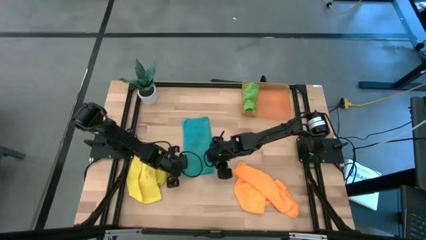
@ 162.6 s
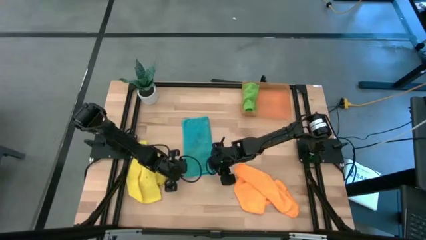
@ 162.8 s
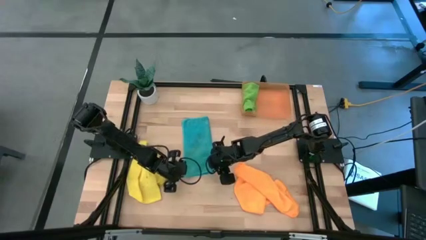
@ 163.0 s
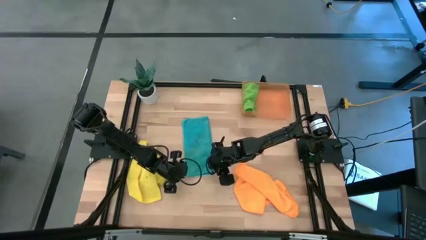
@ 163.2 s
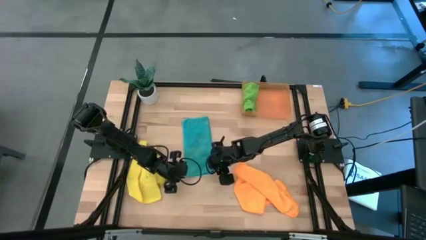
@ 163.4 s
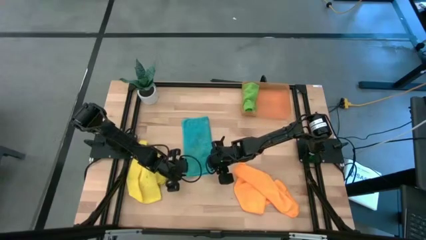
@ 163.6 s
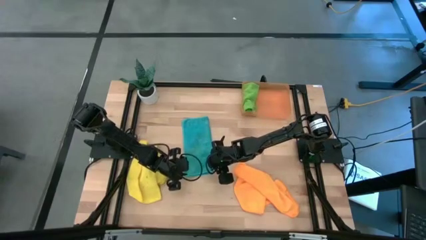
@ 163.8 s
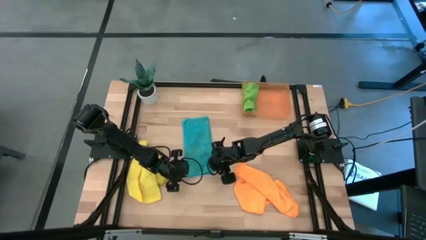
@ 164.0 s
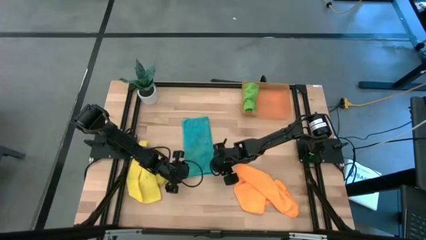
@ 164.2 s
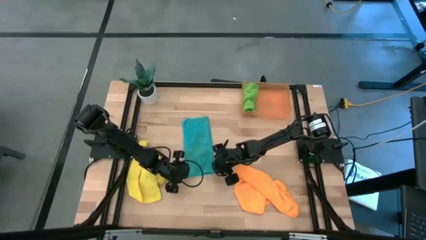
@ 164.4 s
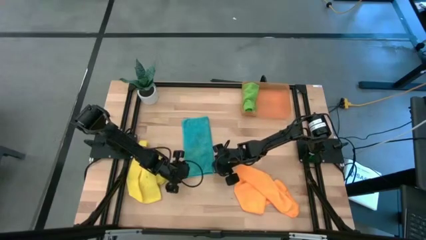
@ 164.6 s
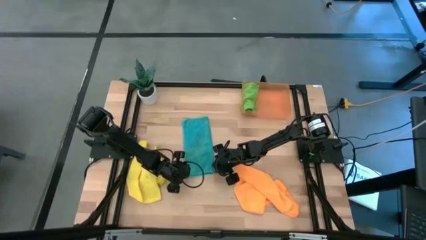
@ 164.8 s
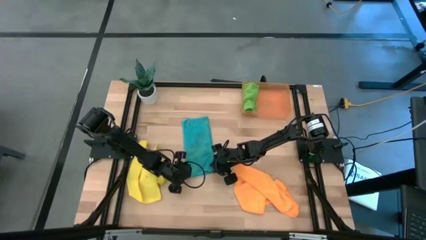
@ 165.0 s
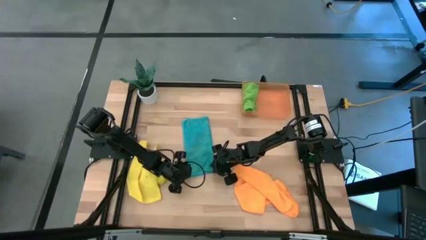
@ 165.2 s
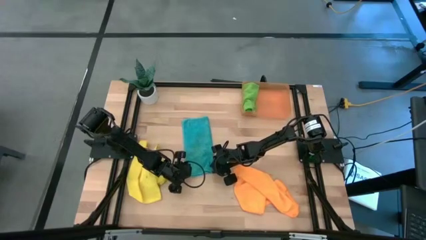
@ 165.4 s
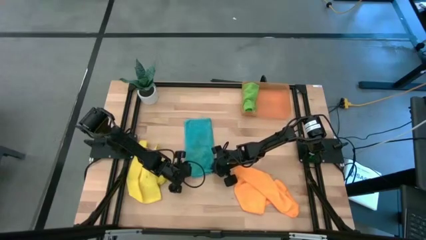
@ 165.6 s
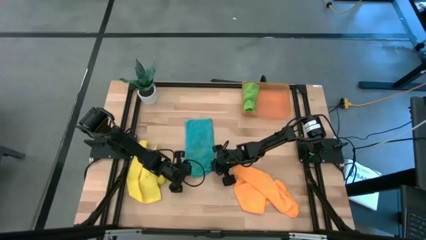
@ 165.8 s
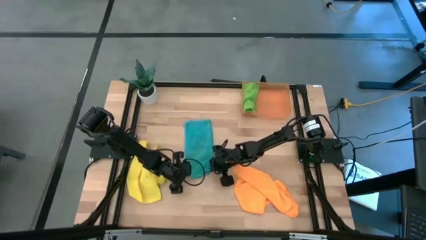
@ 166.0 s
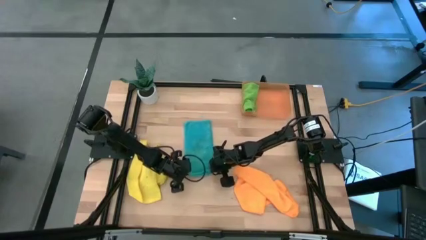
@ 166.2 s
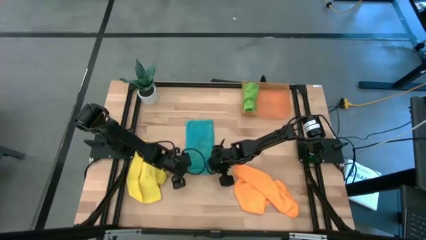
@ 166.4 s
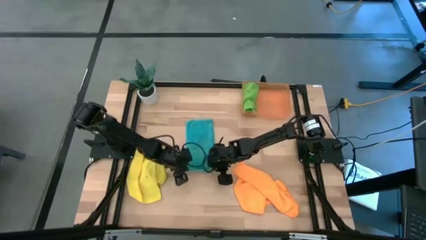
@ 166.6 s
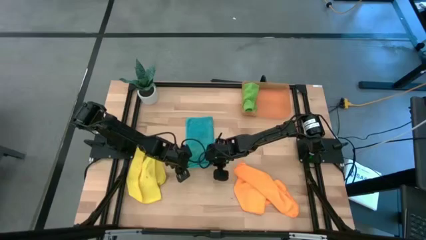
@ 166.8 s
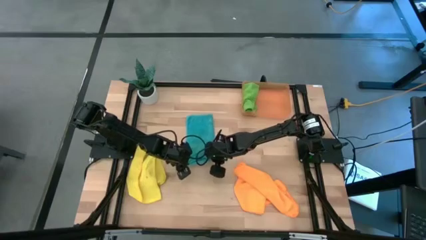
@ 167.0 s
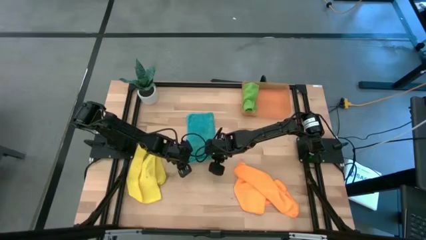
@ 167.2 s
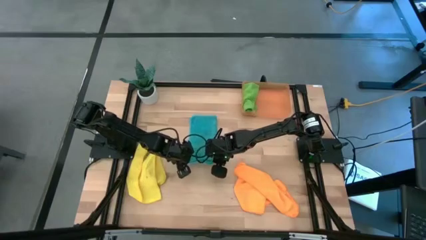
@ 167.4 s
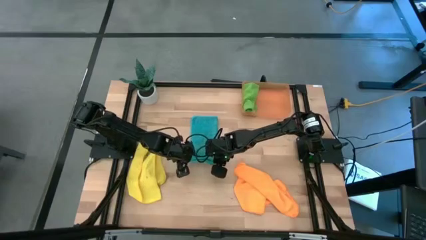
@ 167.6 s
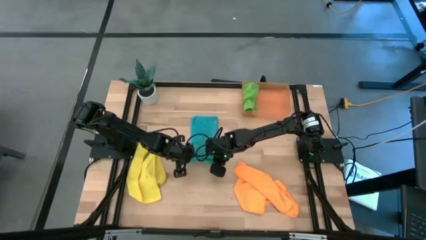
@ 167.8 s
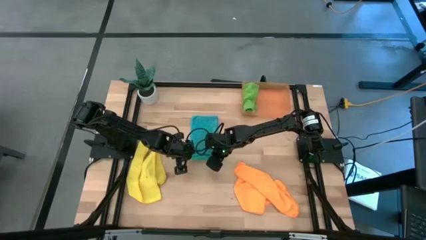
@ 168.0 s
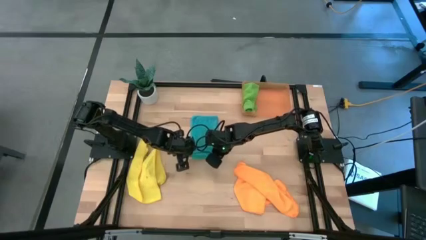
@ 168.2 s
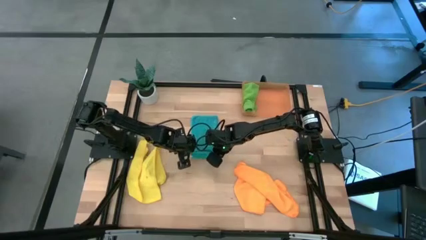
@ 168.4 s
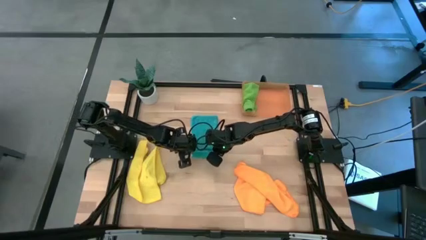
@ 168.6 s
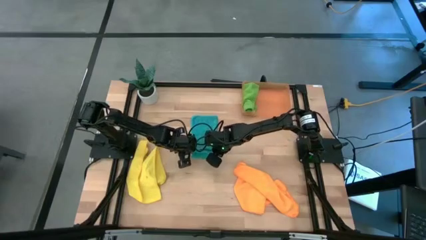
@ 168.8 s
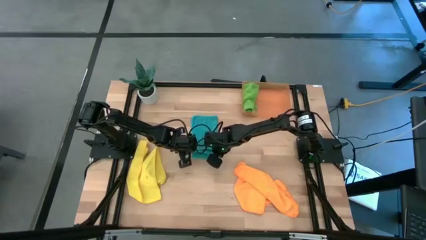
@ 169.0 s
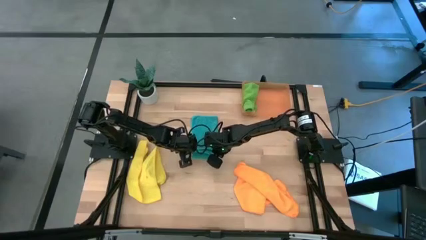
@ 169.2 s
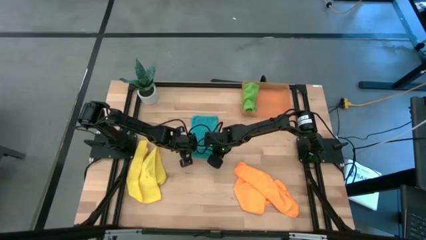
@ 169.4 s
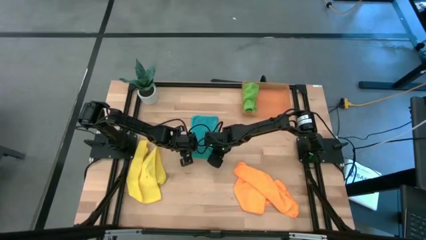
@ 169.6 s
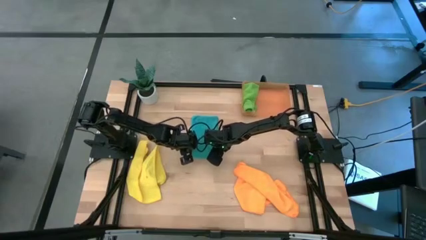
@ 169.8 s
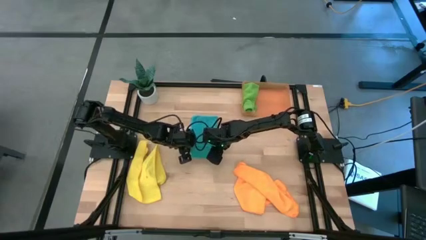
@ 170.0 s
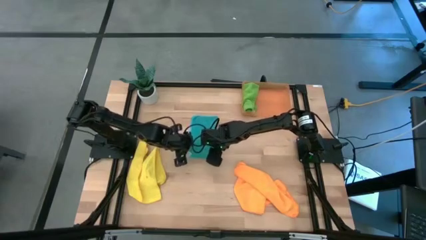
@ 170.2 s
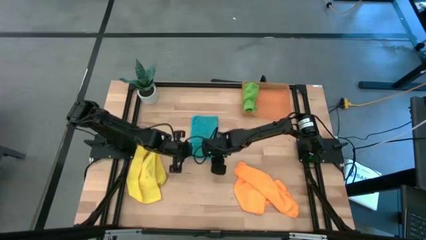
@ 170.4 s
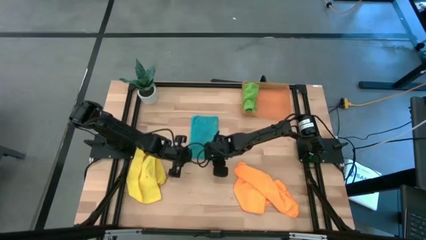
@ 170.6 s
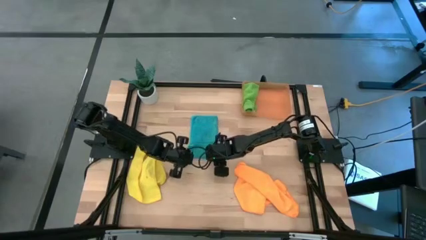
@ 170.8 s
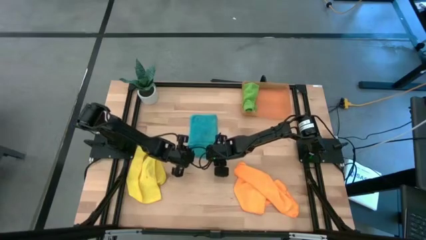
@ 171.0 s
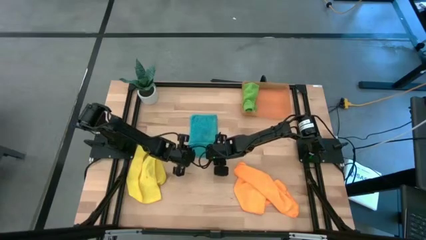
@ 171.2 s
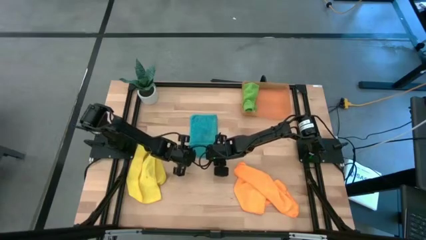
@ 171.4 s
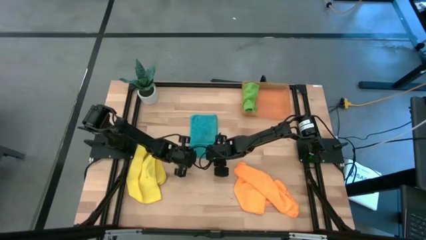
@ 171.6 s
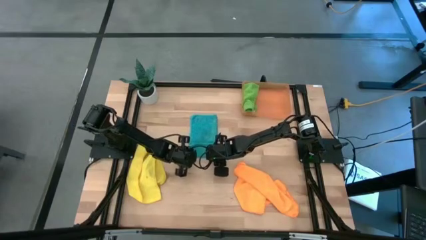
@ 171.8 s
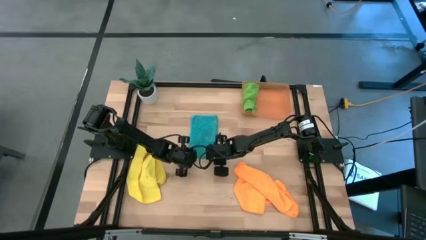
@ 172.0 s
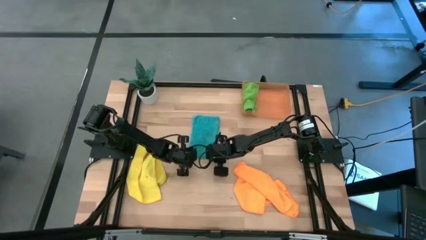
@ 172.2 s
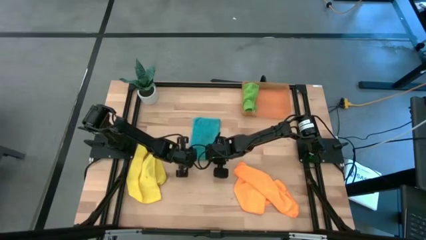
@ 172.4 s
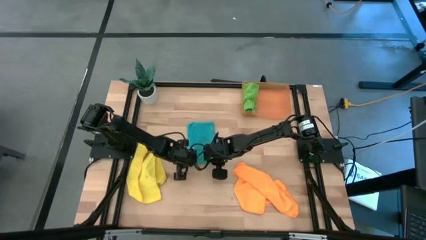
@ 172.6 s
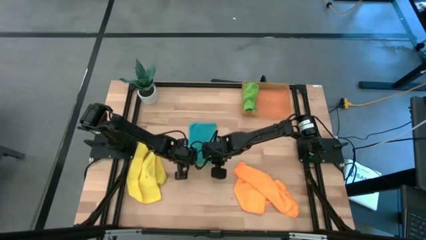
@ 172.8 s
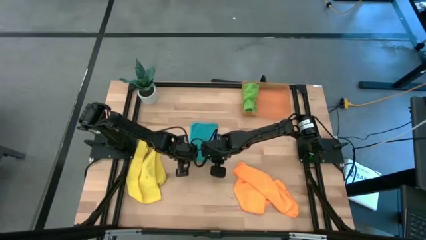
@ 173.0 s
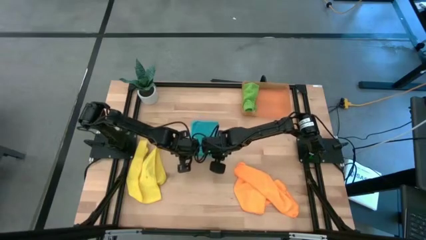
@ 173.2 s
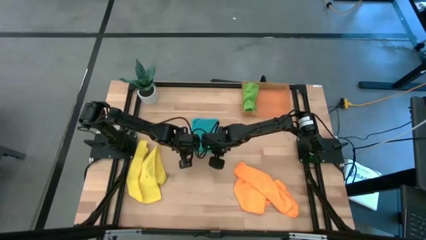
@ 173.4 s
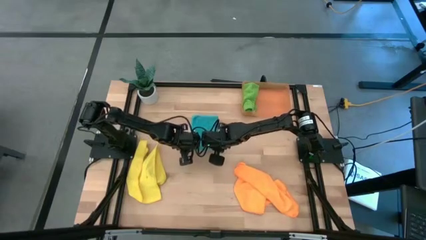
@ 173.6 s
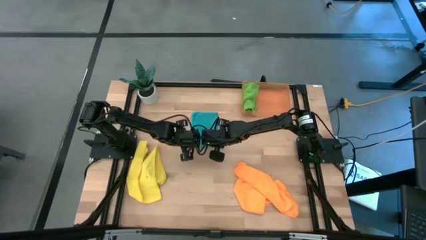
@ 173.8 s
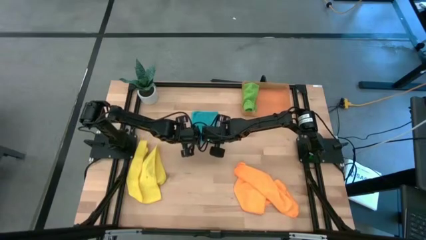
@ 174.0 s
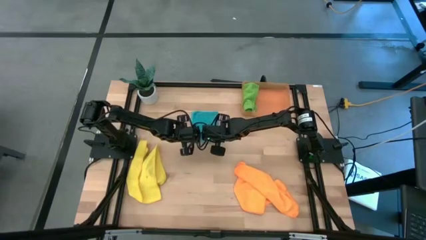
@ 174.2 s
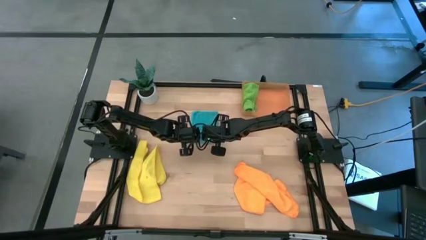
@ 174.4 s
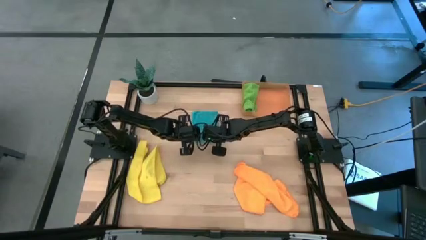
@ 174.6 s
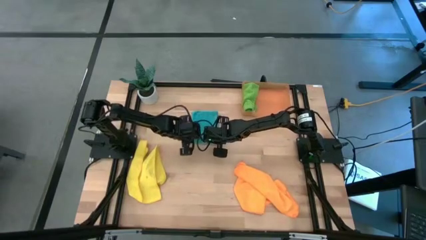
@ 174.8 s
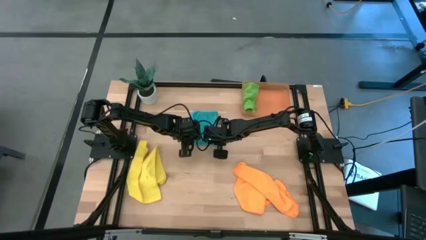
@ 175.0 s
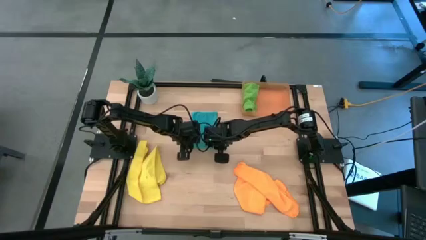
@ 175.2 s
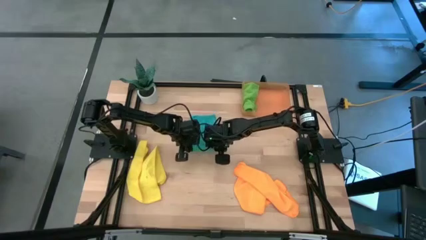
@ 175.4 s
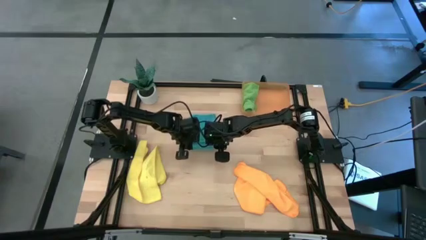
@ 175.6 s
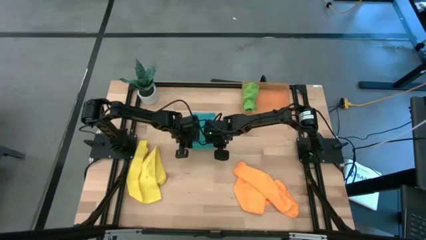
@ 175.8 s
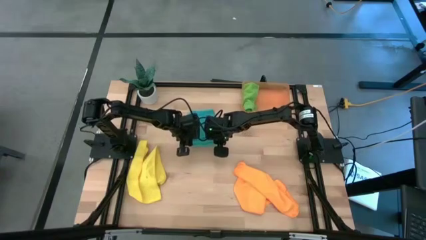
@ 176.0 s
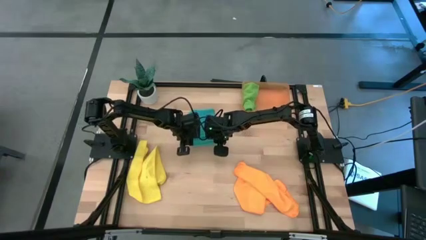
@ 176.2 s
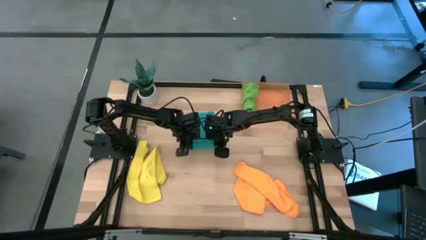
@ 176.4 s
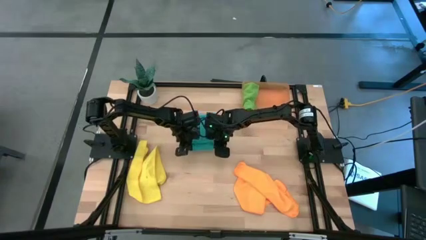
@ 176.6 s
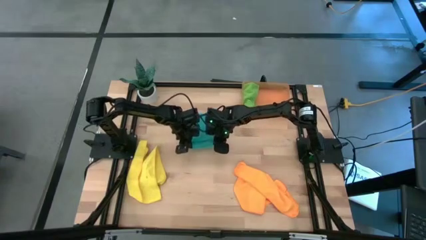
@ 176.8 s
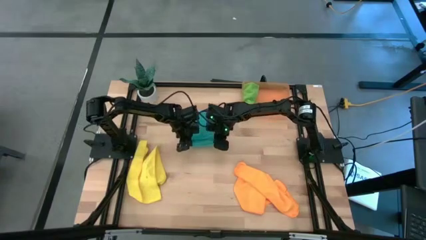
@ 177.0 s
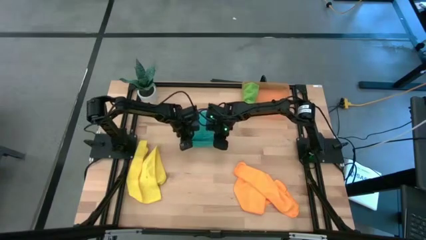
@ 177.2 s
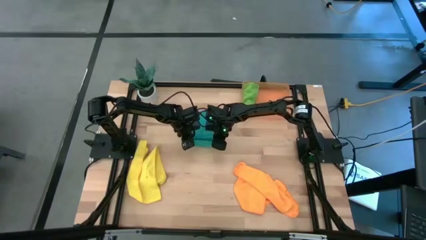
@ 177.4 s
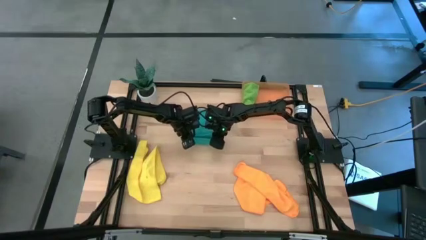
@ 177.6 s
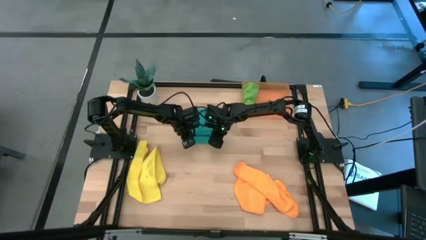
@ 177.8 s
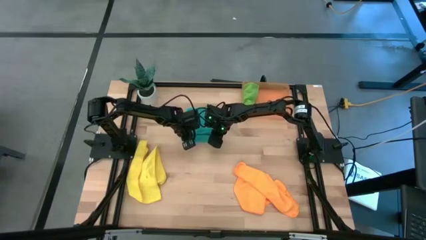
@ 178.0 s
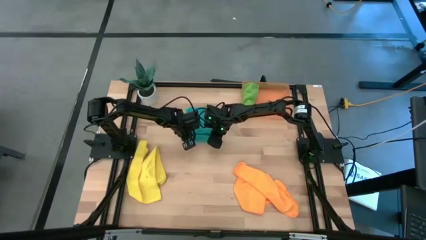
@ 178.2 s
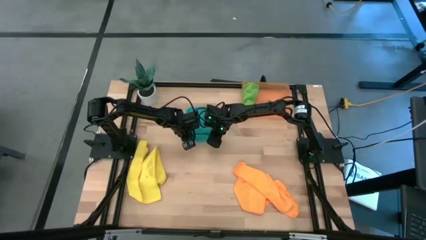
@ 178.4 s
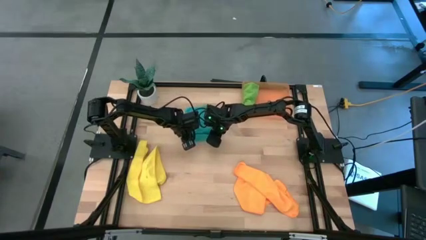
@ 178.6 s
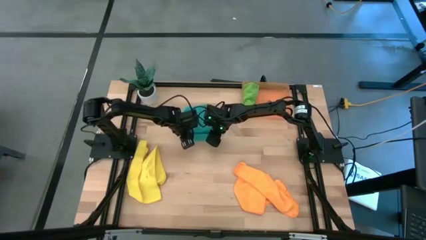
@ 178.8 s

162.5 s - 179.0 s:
Task: Roll microfiber towels into tight, uniform cylinder then place into a basket
Fold the blue towel
